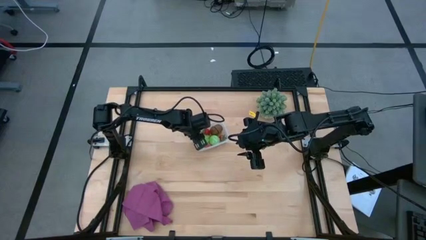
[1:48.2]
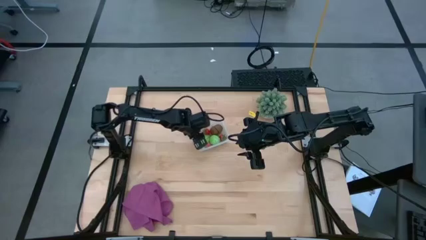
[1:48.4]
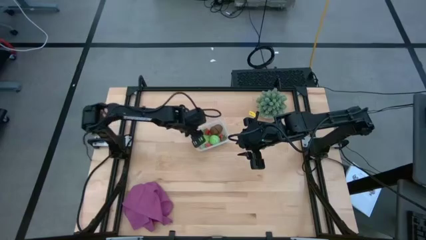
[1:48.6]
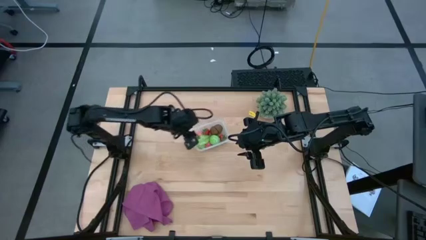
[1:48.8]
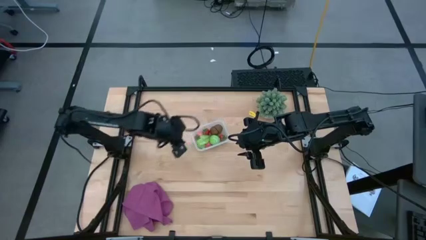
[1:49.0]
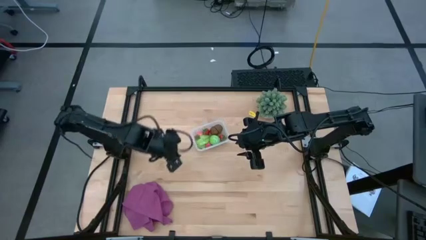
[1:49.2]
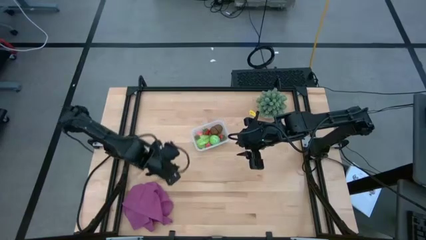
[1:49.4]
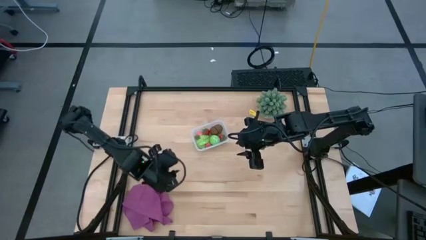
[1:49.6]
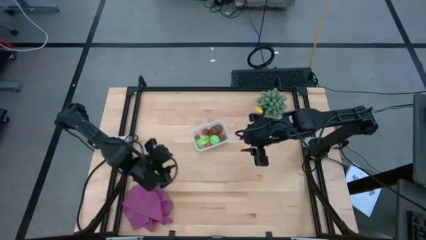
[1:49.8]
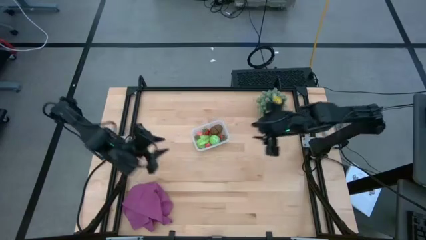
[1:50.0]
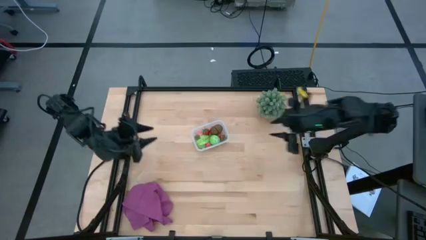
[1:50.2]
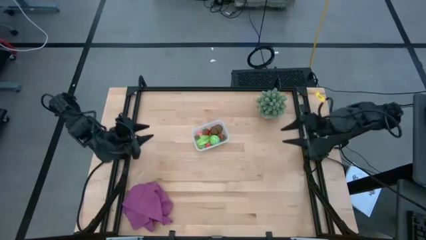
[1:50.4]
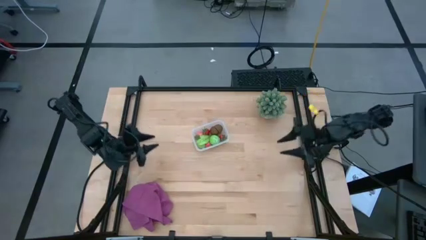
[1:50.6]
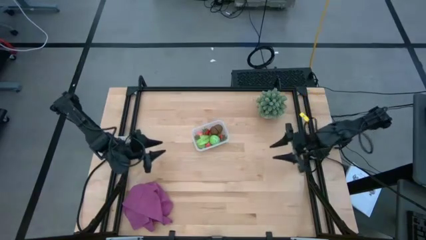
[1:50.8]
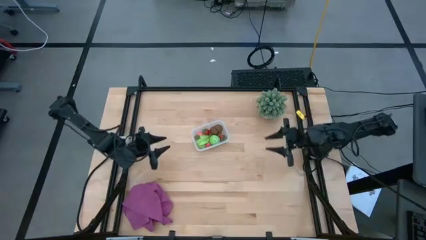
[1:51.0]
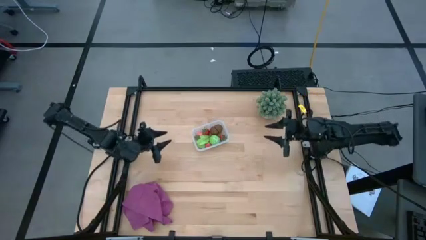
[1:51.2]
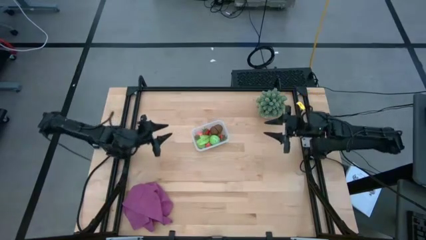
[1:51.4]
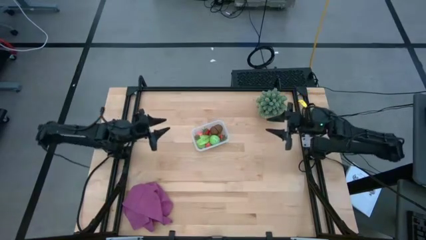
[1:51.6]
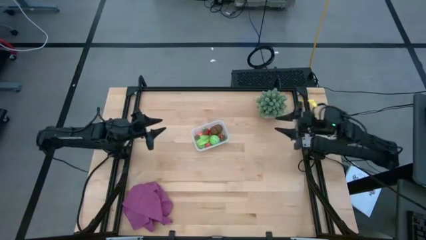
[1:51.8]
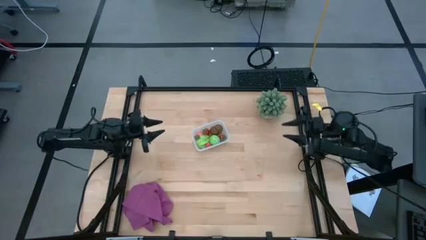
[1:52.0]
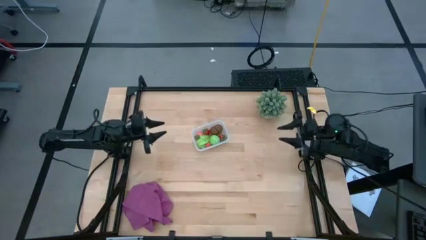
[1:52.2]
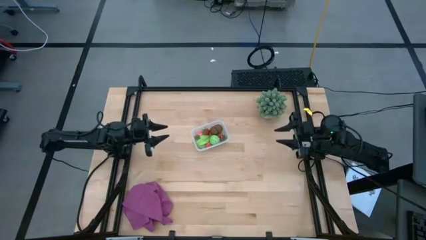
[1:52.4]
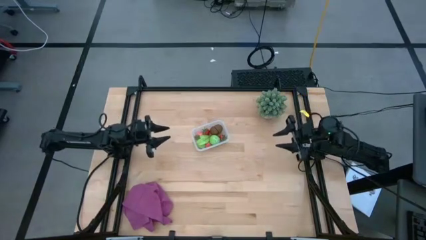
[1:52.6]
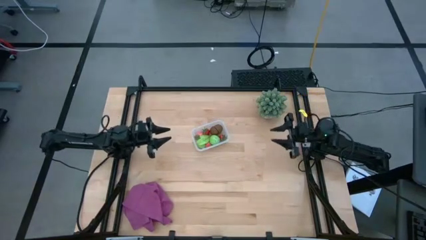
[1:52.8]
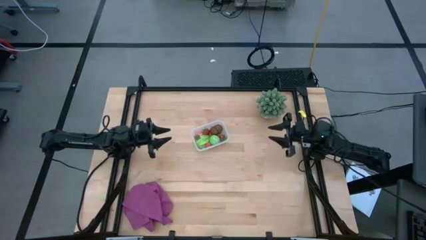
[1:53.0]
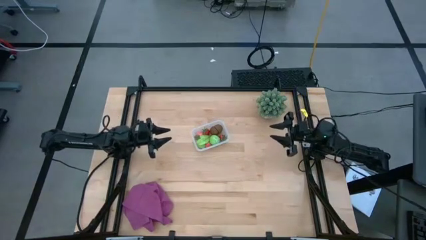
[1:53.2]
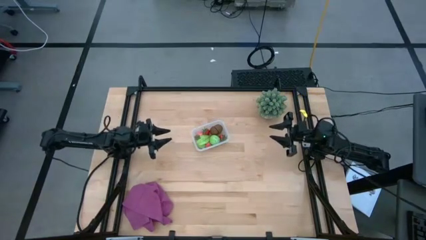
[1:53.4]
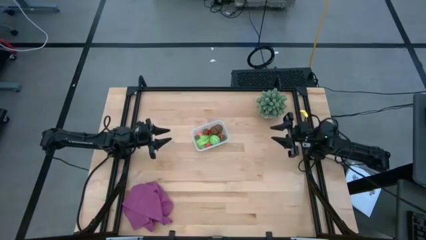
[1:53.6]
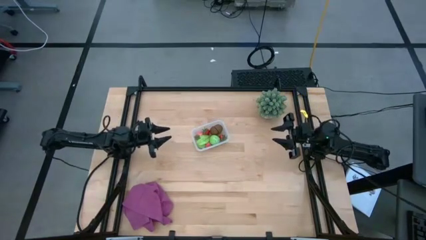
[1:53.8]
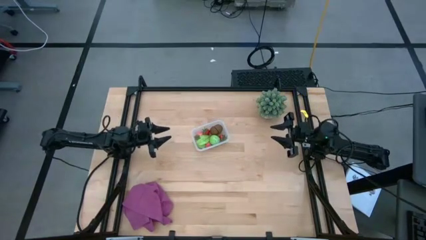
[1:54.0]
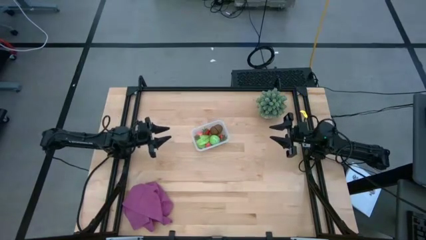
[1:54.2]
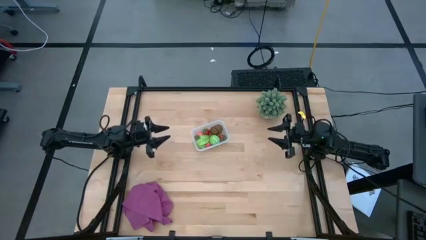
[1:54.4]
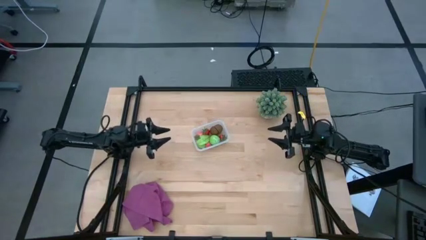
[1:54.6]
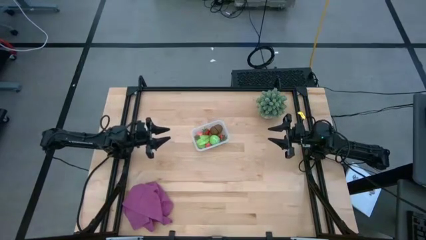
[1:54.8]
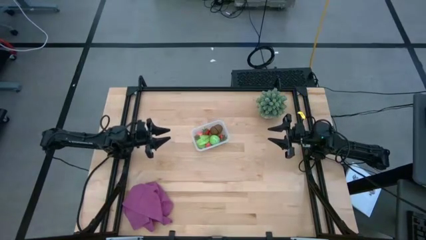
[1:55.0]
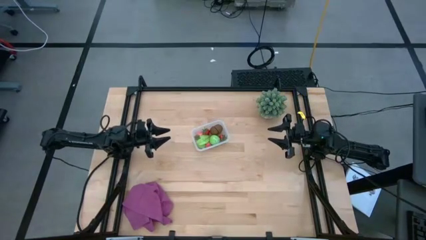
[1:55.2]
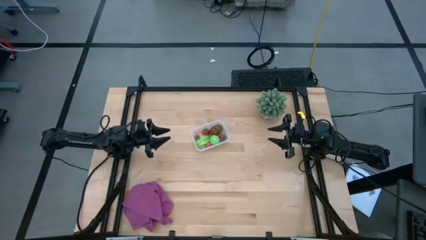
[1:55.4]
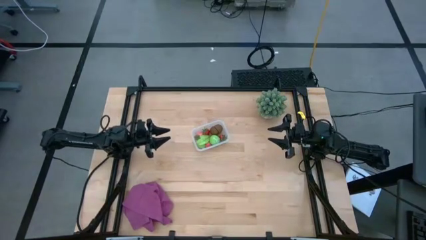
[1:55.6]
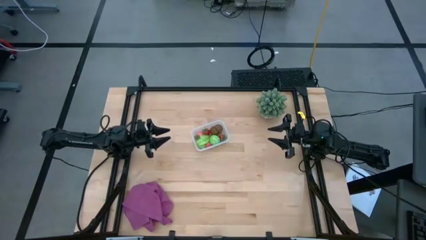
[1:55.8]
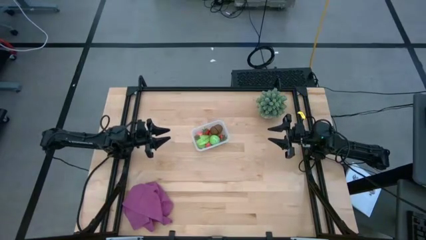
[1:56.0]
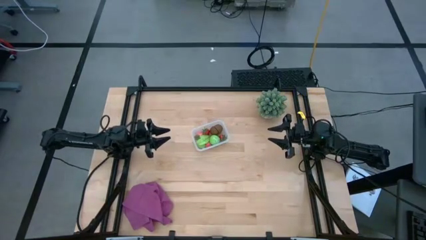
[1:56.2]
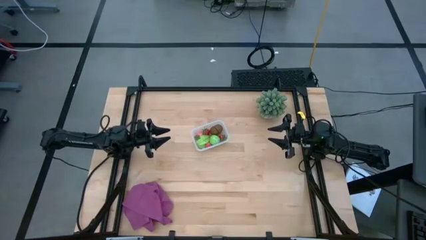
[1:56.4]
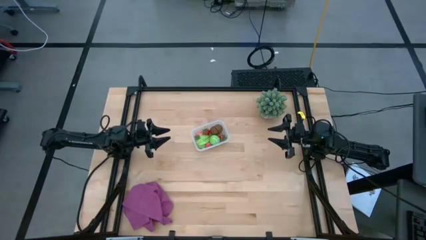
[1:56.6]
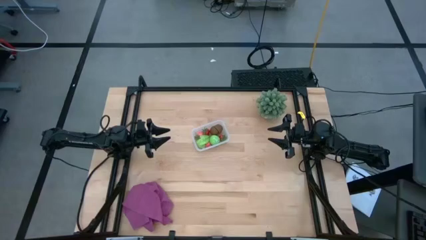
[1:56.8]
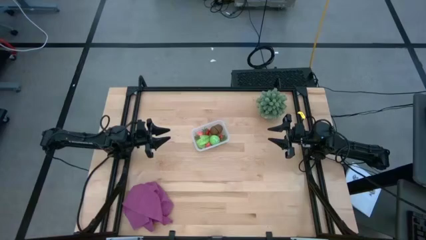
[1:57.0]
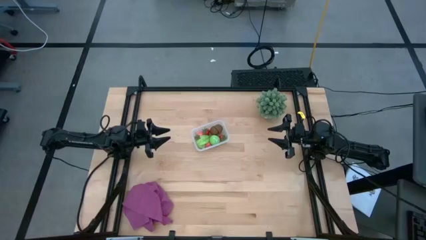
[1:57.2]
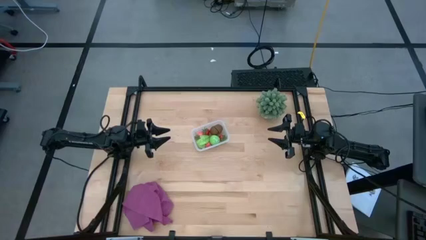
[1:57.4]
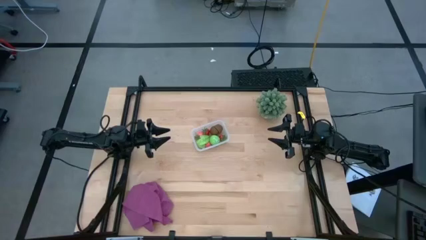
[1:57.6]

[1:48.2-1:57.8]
Task: Pick and placing Produce into tupperware
Return to Home Position

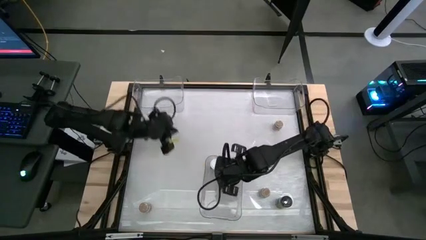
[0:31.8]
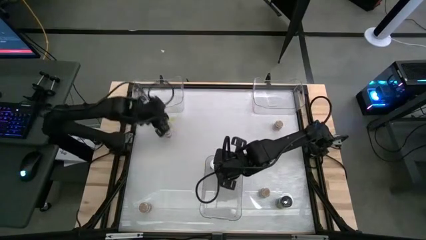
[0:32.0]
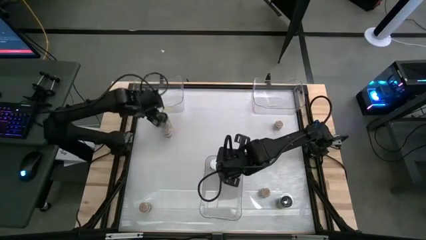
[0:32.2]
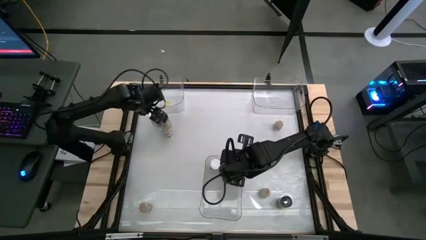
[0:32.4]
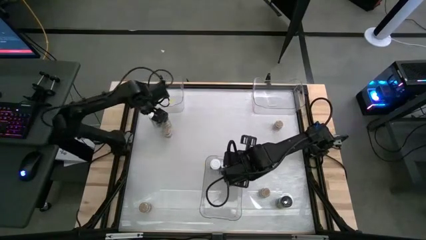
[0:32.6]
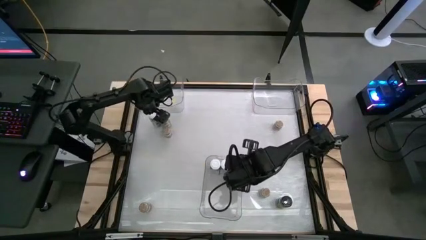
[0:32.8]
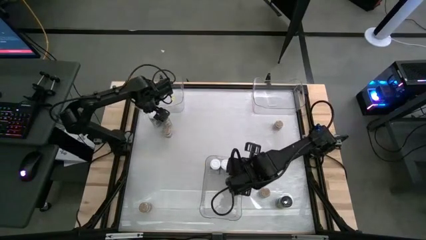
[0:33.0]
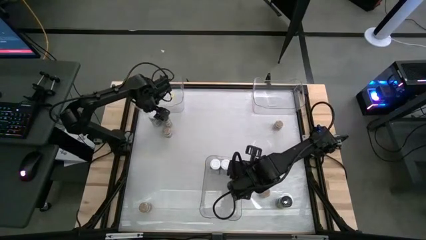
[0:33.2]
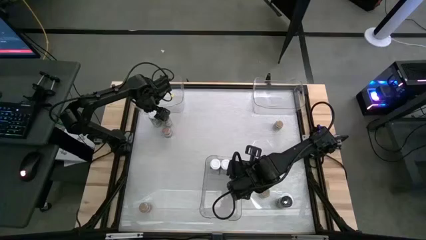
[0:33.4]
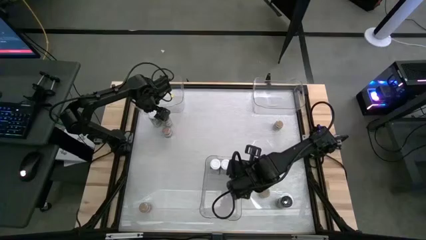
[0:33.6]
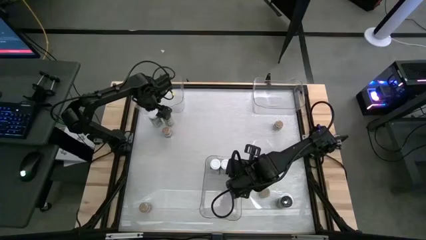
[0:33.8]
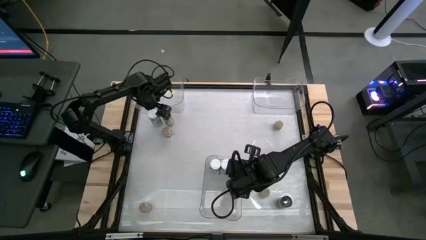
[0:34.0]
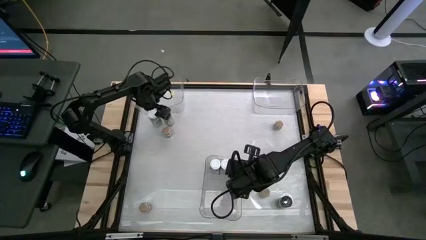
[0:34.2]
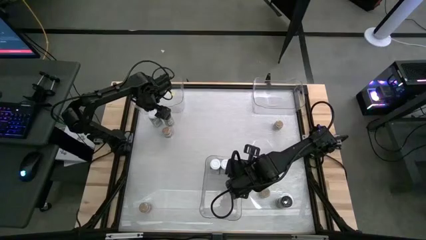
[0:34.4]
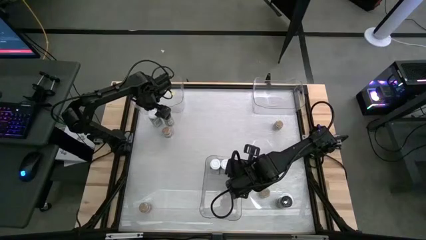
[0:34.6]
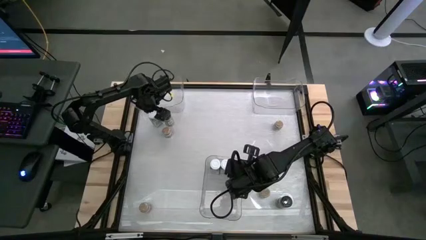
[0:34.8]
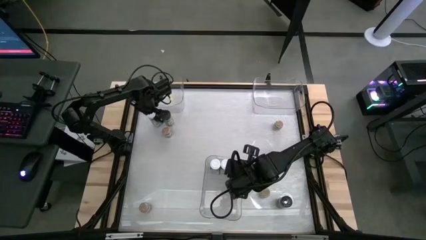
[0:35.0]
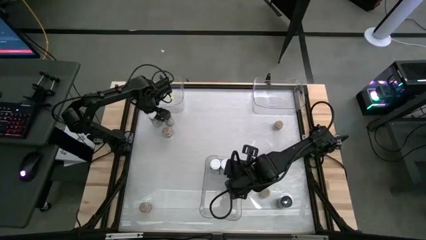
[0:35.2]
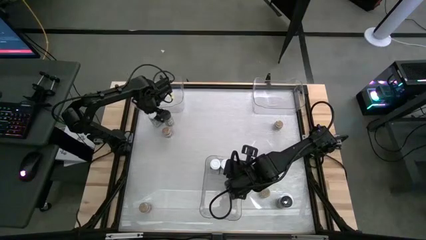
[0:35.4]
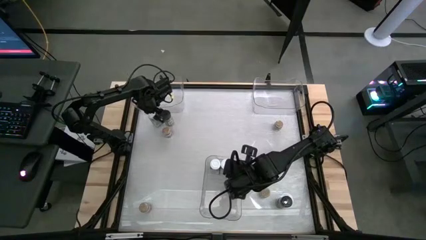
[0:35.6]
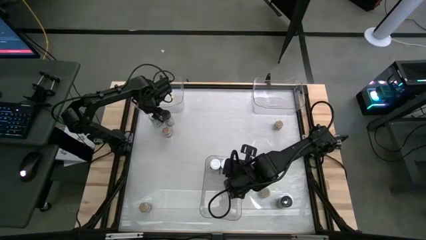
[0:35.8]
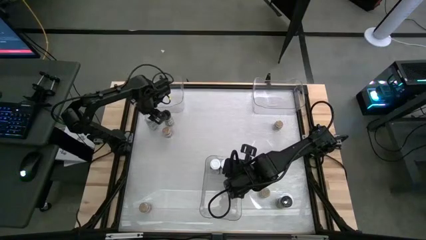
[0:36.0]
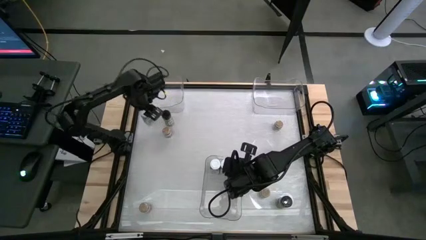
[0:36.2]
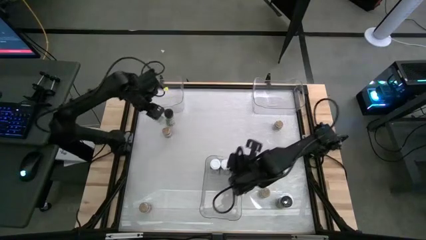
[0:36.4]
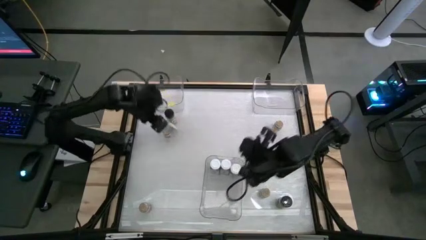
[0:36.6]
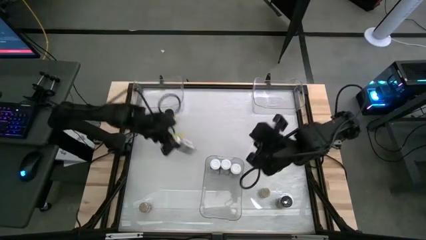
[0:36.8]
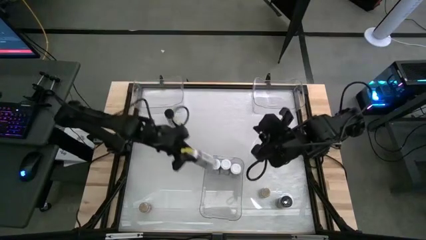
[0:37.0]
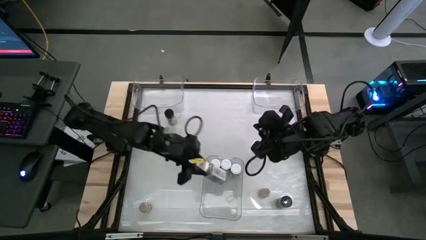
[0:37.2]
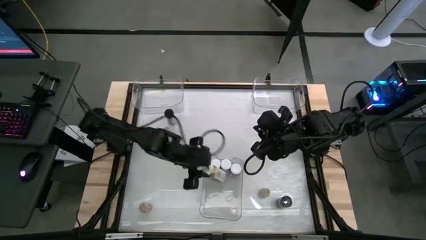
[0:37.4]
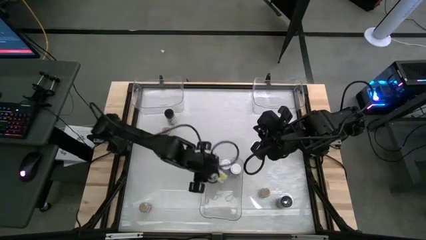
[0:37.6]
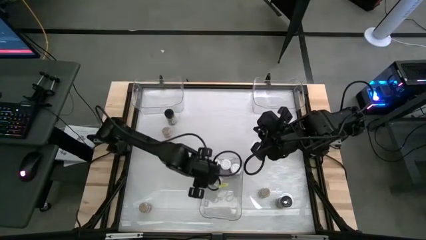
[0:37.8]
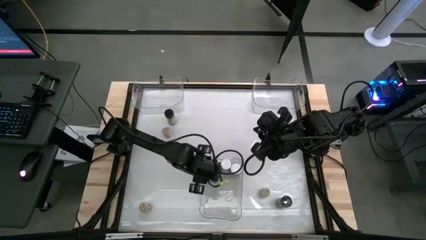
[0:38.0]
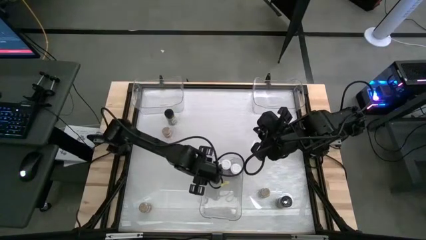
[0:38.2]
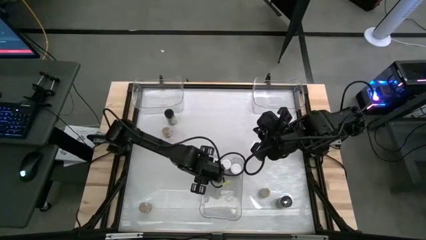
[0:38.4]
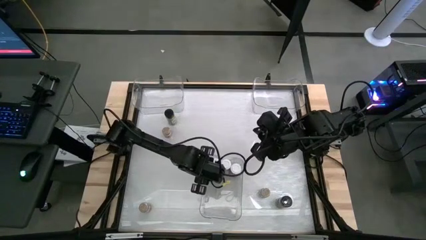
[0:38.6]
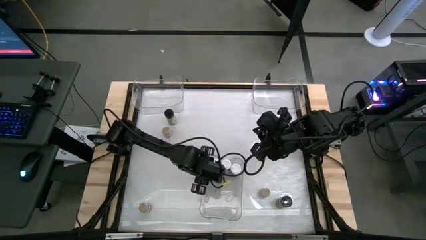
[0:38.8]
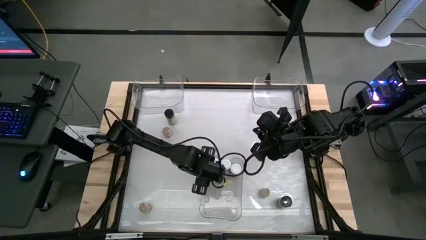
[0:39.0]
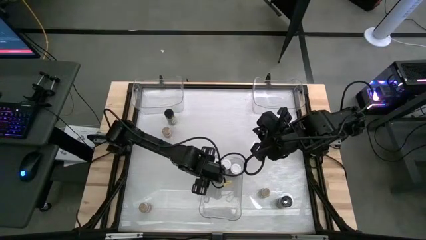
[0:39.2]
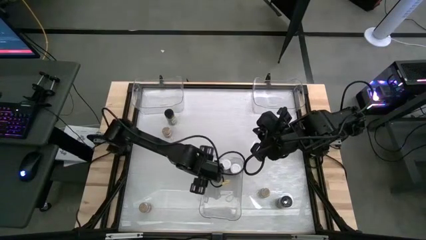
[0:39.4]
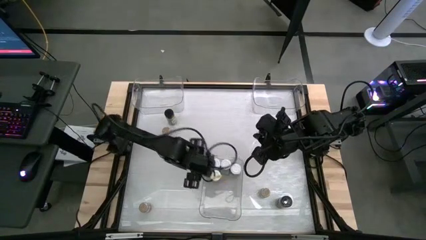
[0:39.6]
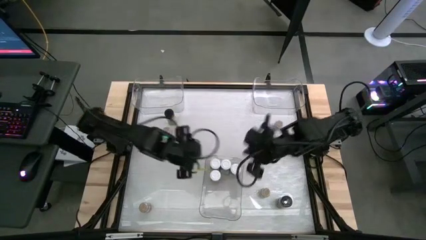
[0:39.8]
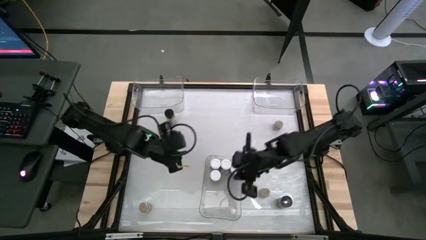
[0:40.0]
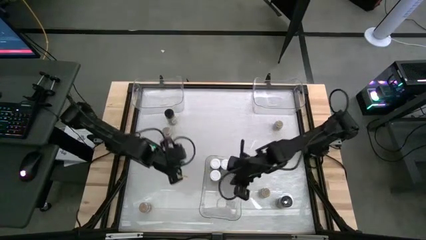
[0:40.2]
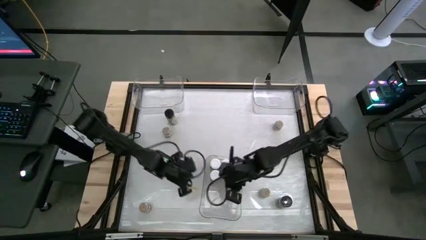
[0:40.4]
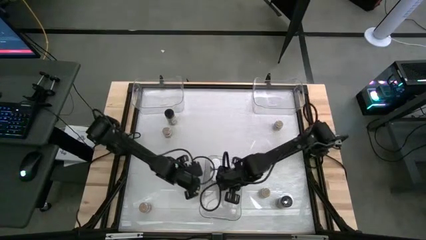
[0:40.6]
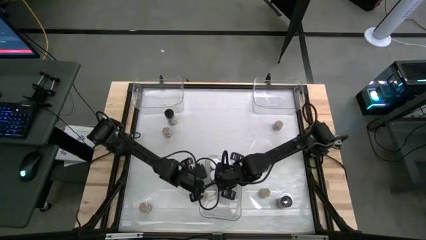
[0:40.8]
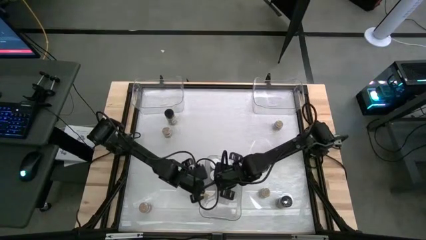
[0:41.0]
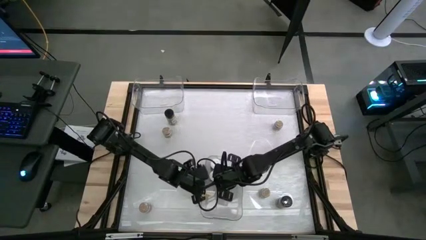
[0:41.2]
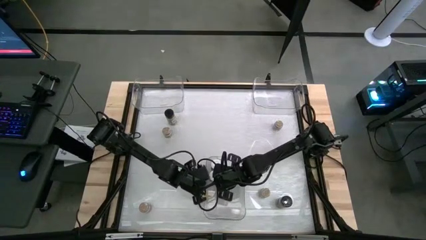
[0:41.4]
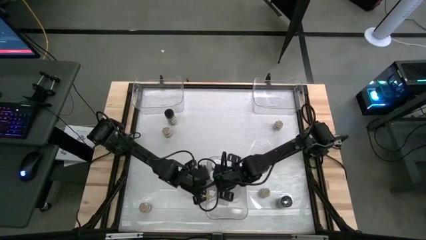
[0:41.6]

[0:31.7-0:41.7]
Task: Sort spices by type
Put the white seasoning bottle into the bottom transparent bin
